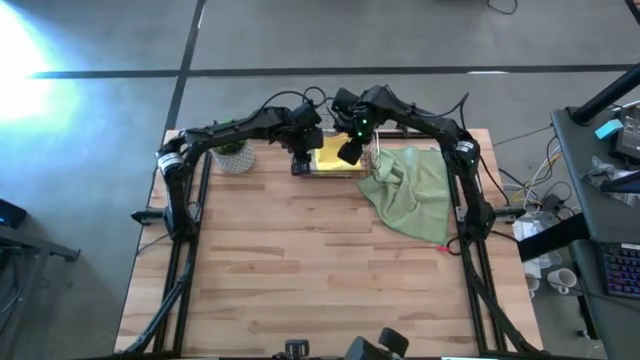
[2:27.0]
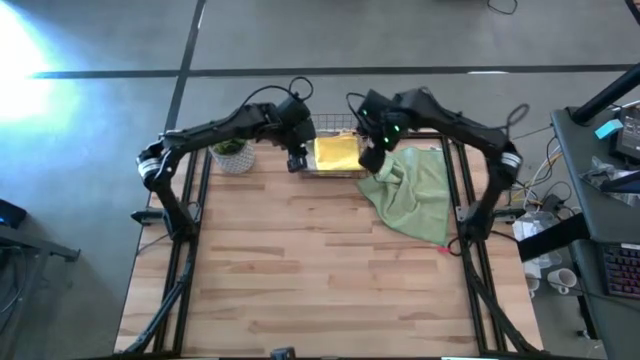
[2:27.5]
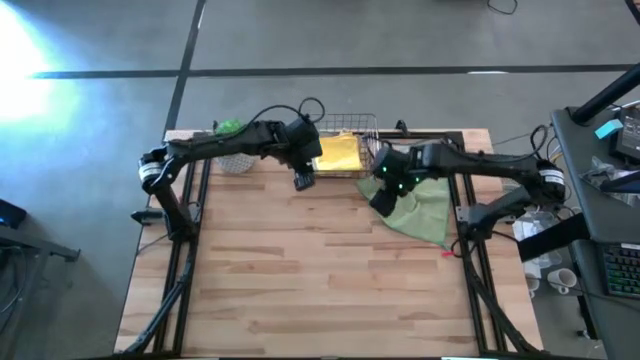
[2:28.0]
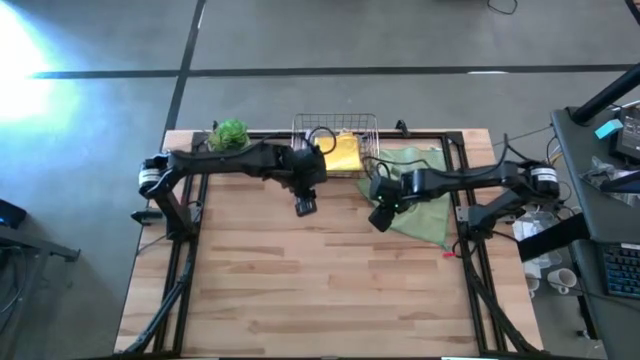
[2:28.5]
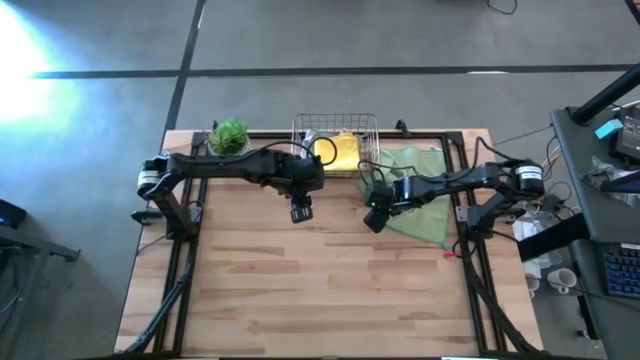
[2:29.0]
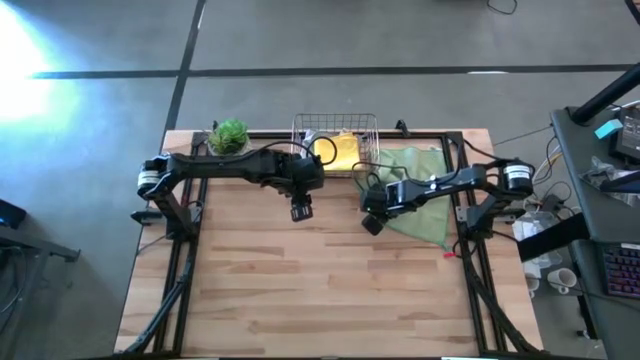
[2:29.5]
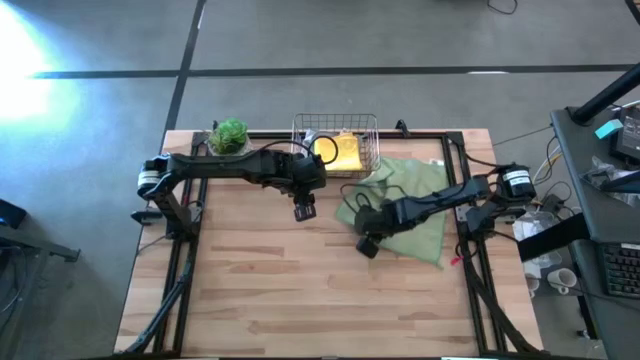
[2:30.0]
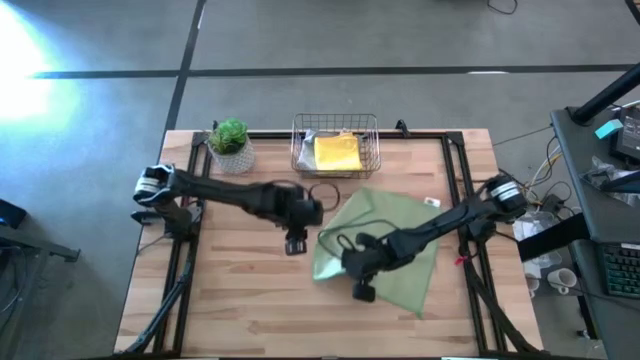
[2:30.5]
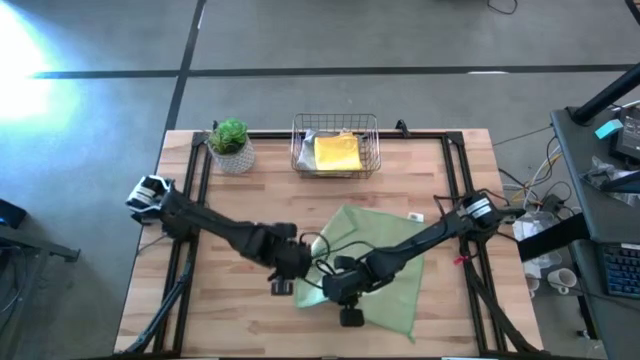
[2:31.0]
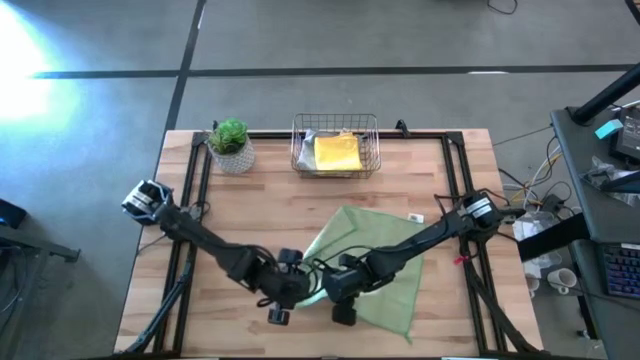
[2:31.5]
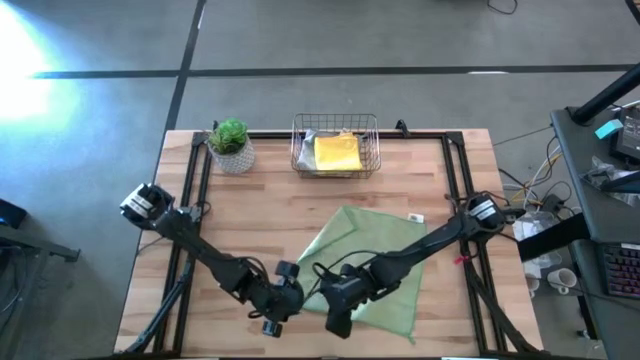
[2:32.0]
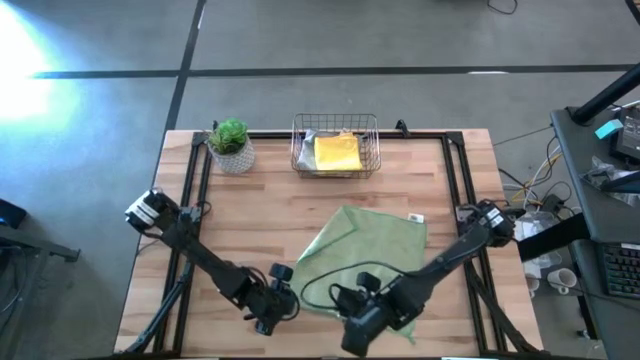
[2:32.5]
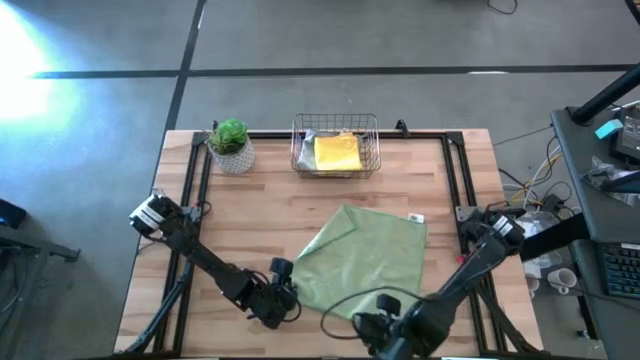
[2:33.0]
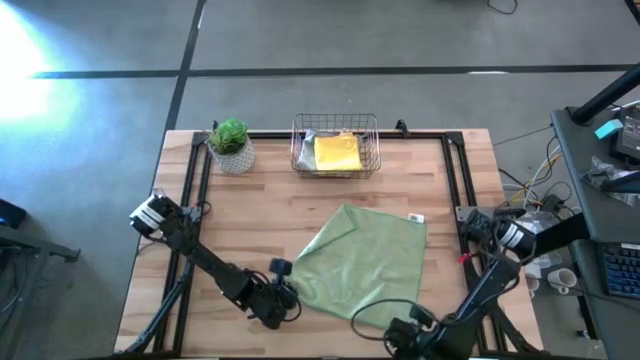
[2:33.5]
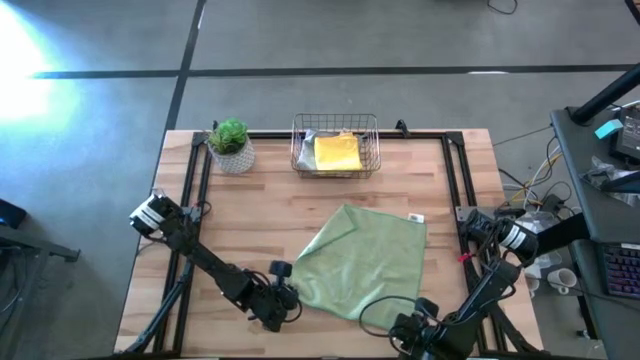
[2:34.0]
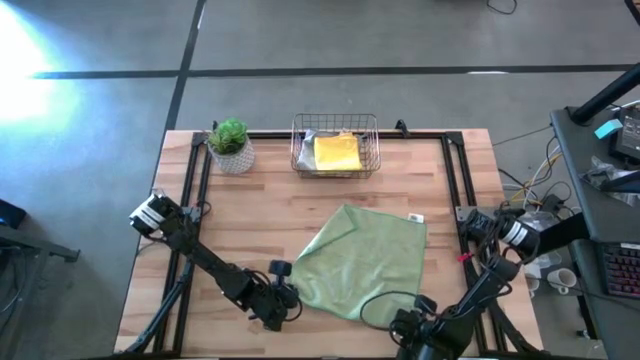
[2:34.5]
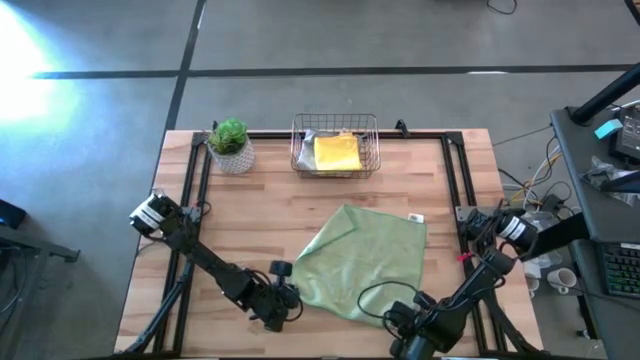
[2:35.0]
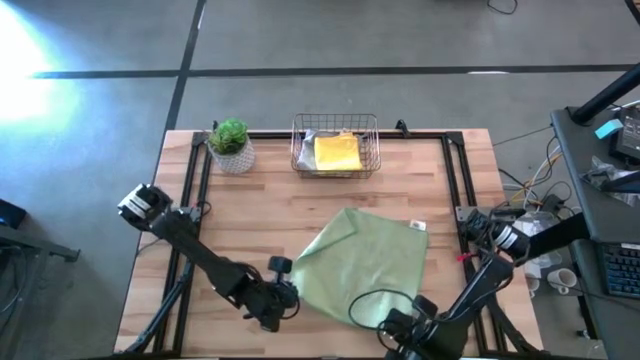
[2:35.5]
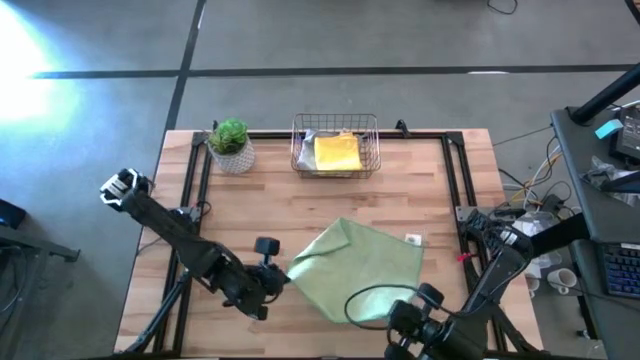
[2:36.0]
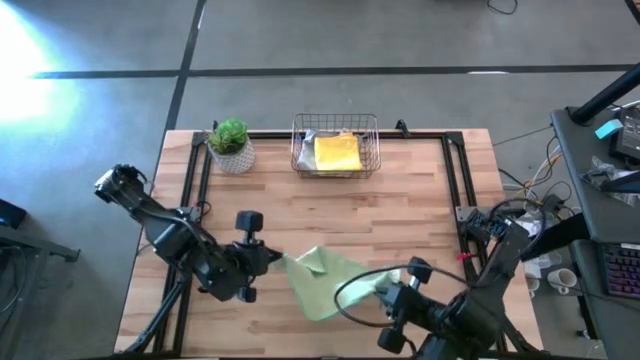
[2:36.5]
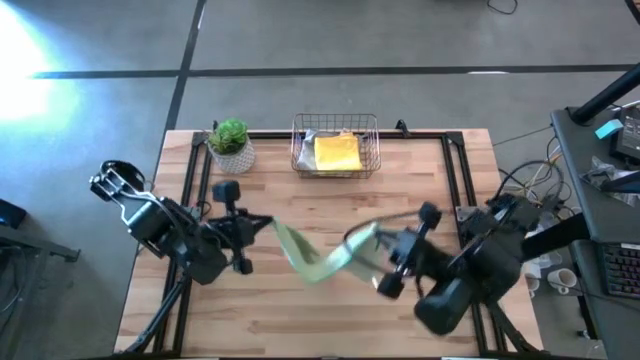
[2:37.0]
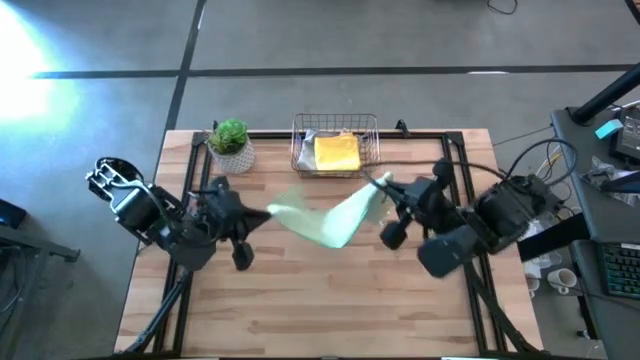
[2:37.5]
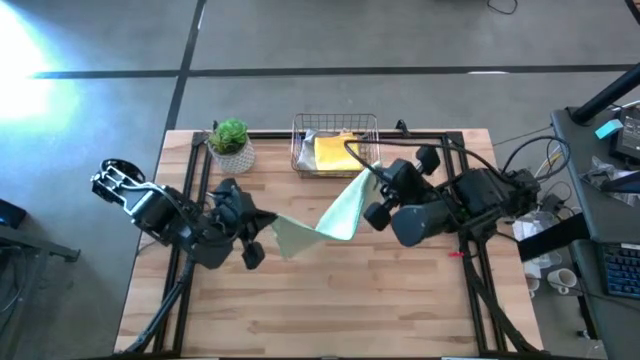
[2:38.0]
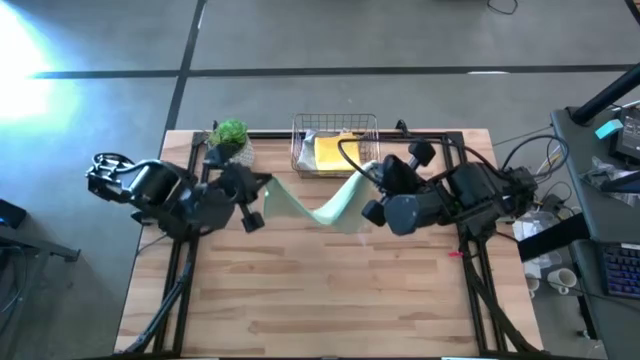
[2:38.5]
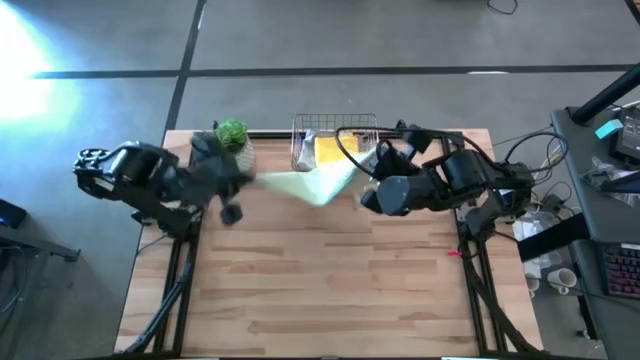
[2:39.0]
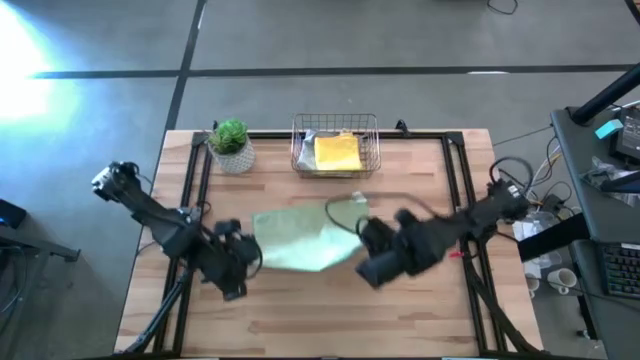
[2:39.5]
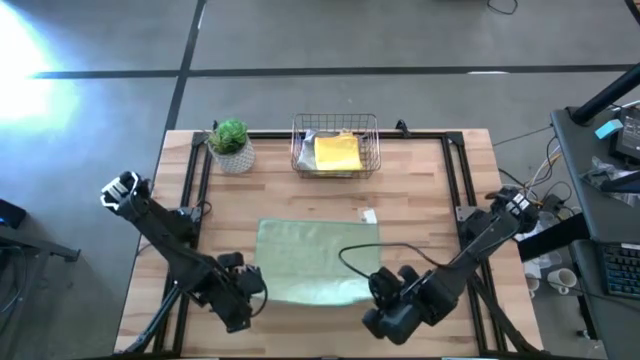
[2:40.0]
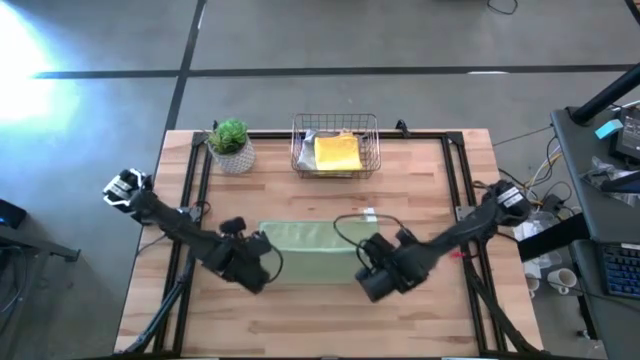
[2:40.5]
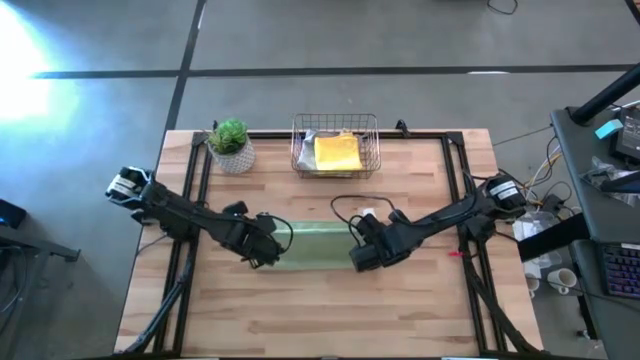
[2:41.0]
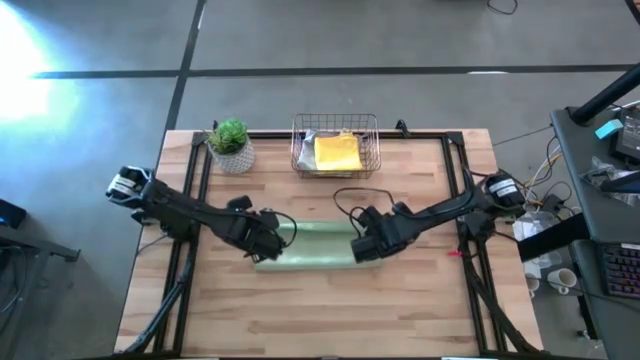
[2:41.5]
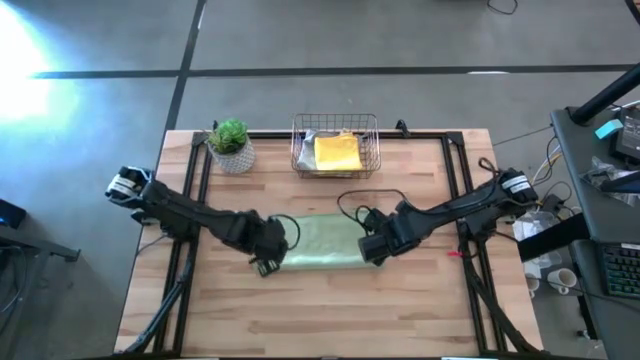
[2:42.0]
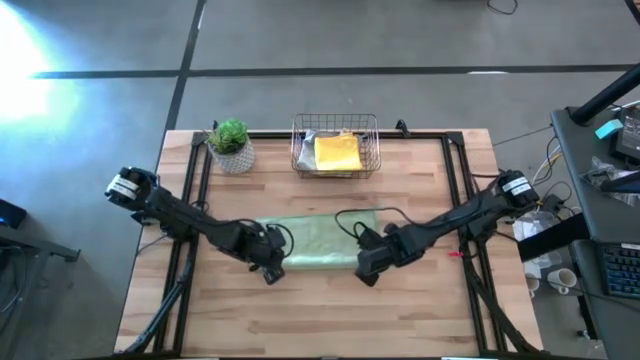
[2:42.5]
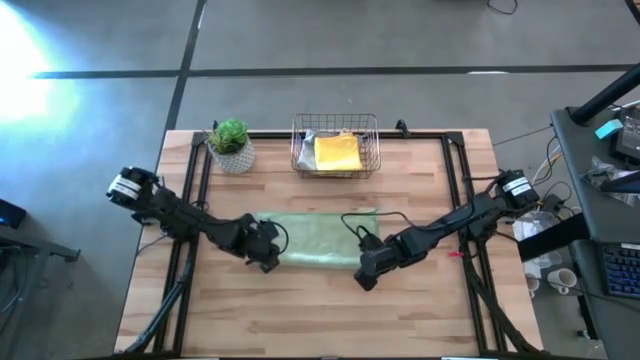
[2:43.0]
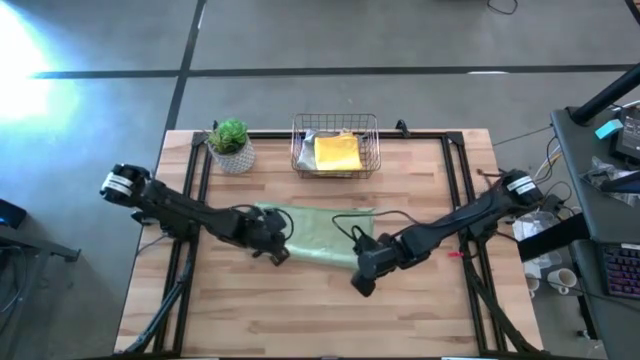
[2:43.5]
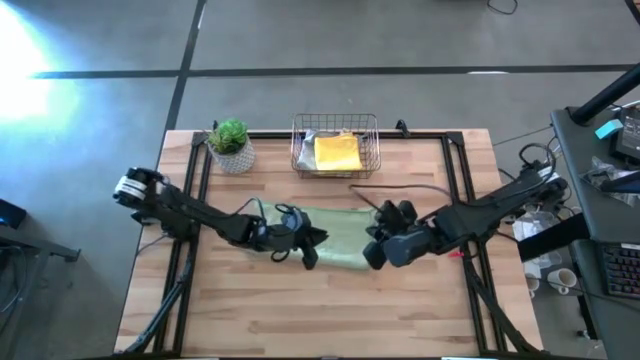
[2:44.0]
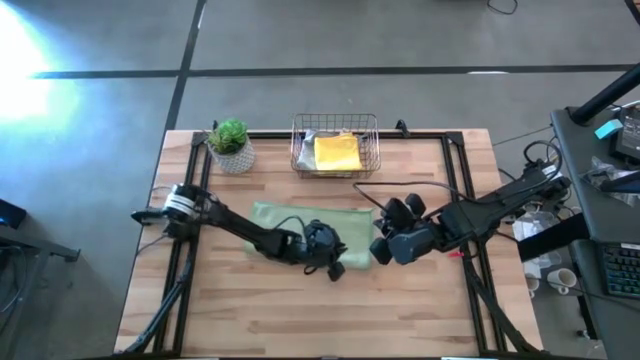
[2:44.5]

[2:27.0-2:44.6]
Task: Fold microfiber towels
Fold the green towel

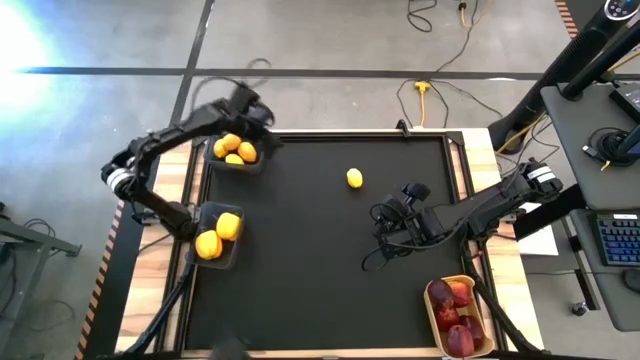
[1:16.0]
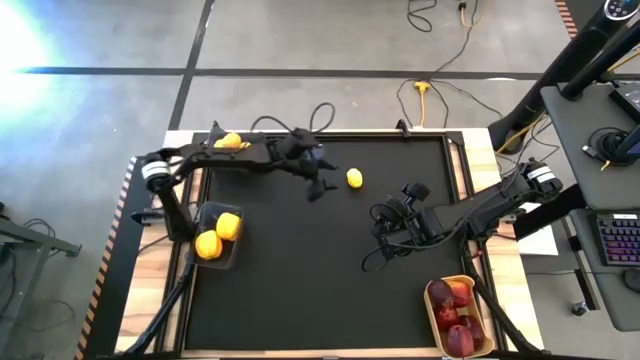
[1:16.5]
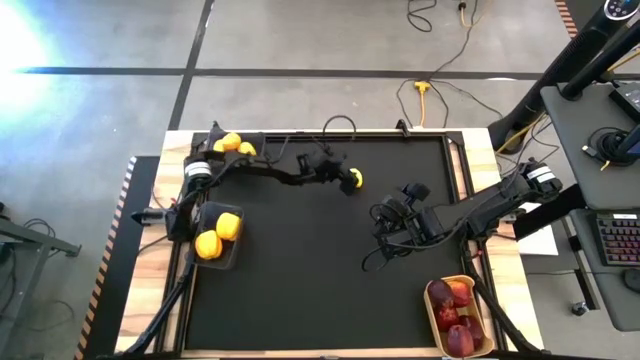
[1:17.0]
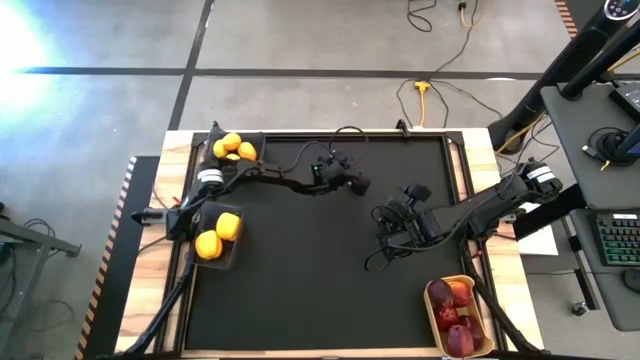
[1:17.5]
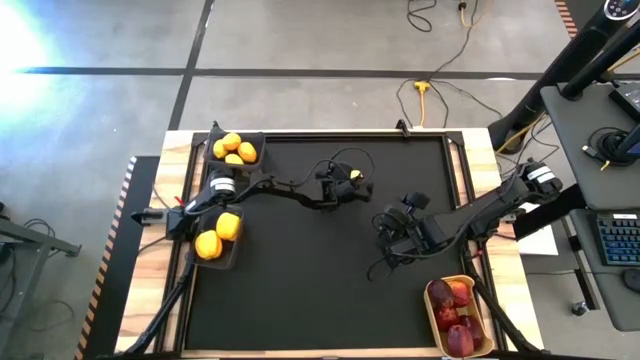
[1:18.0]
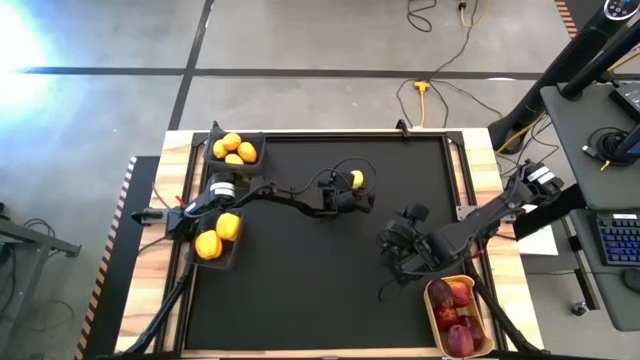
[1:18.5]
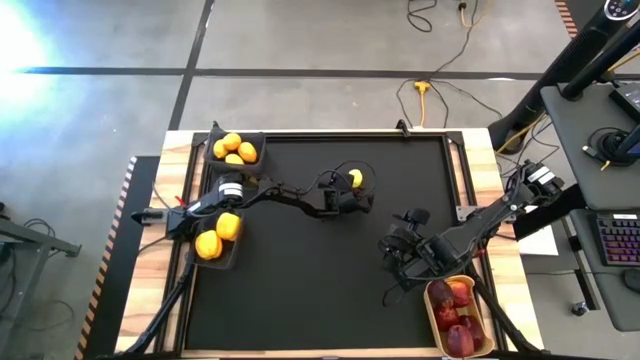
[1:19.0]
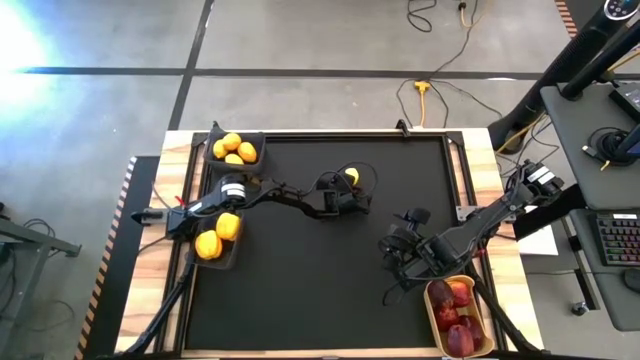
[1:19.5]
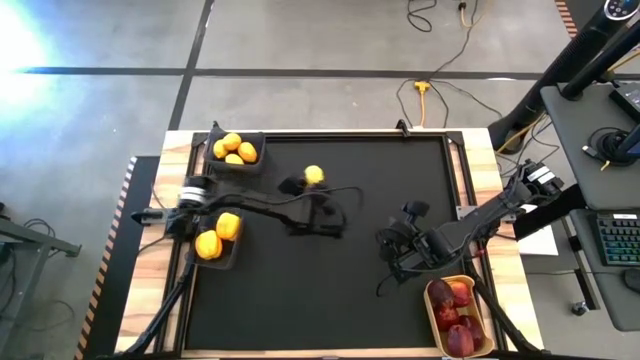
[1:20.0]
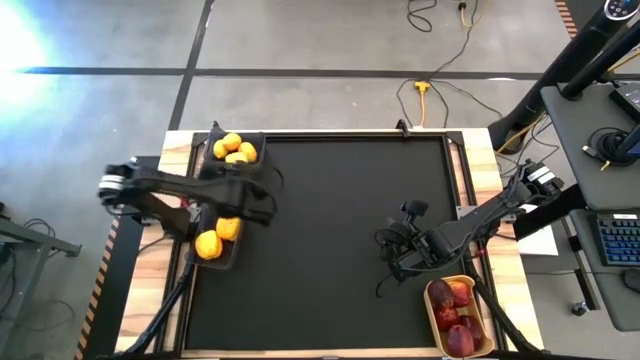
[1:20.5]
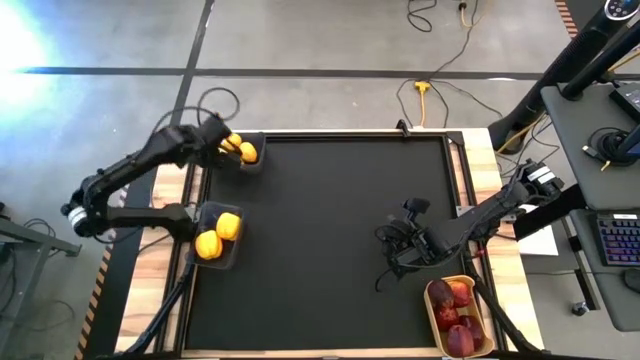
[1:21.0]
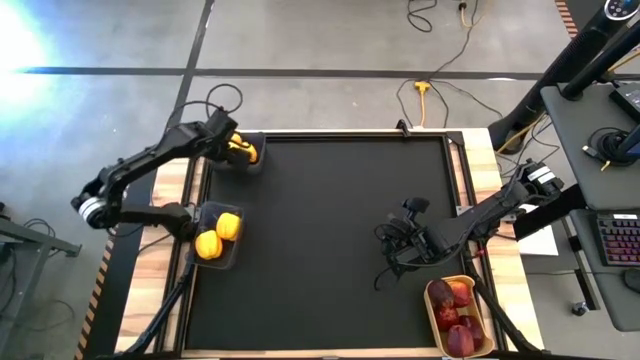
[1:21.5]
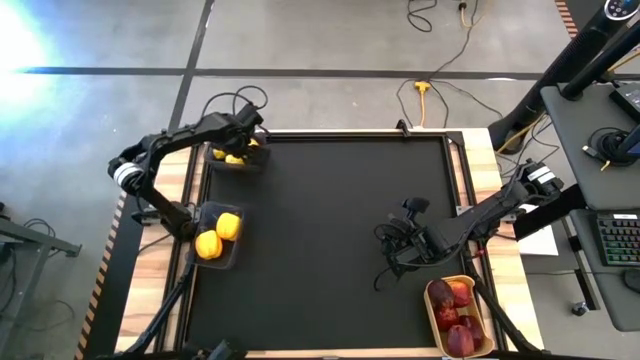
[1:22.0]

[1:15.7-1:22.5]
Task: Sort produce into baskets
Put the lemon into the top black bin
